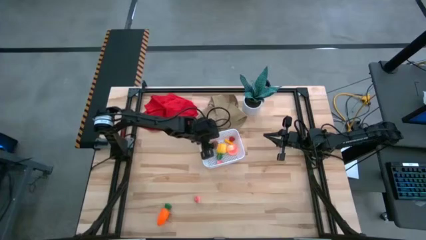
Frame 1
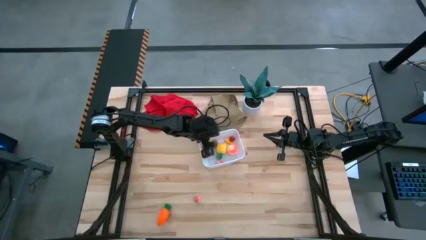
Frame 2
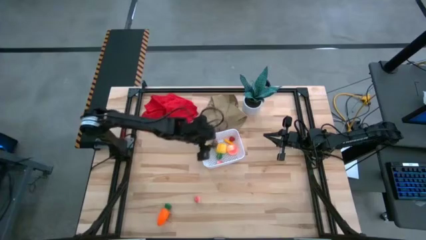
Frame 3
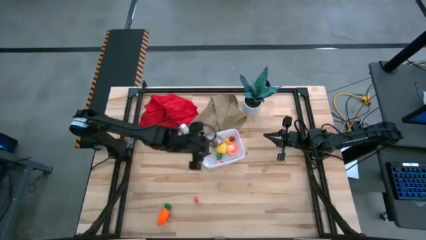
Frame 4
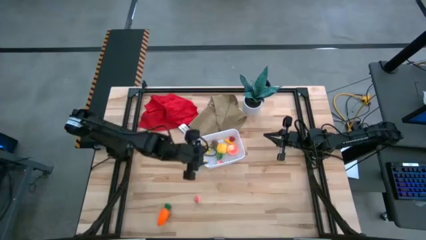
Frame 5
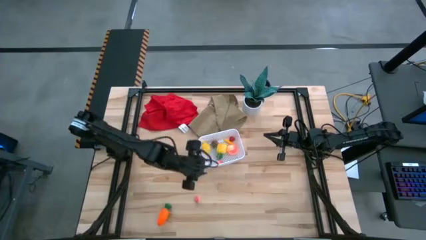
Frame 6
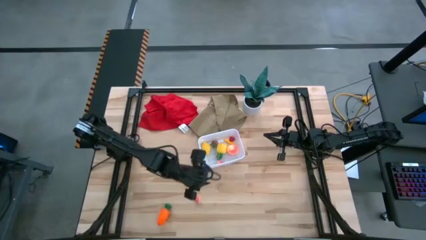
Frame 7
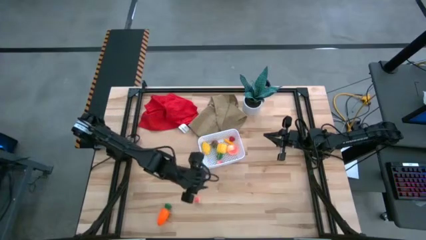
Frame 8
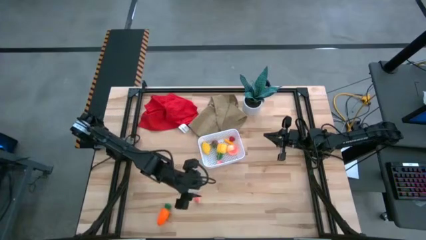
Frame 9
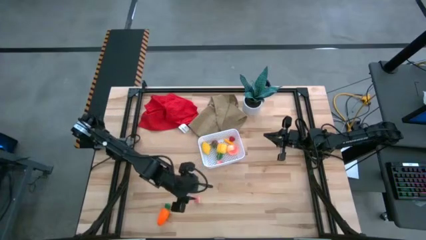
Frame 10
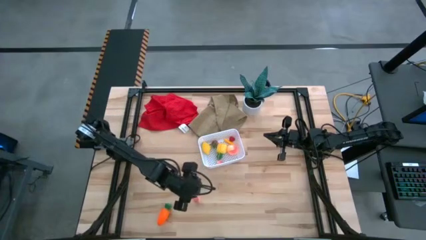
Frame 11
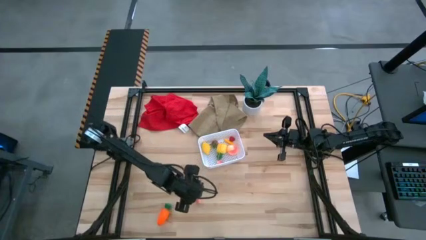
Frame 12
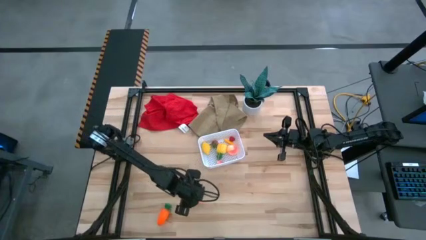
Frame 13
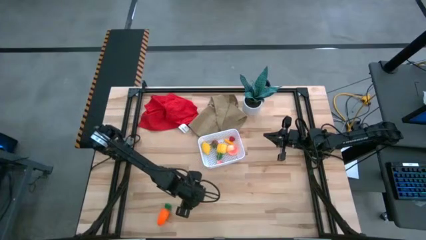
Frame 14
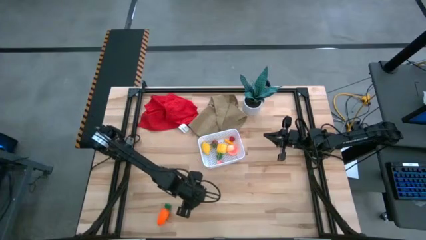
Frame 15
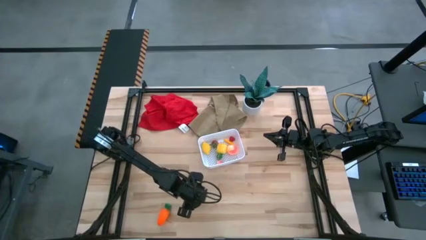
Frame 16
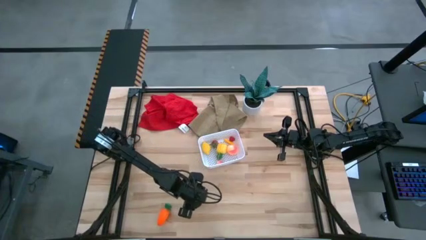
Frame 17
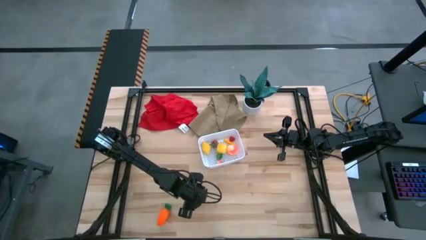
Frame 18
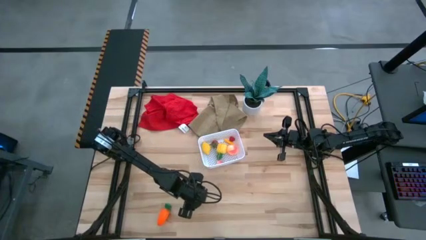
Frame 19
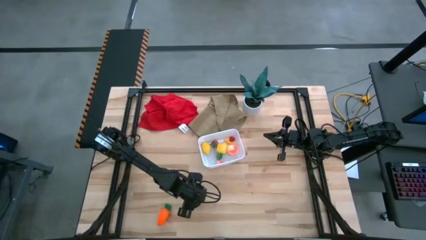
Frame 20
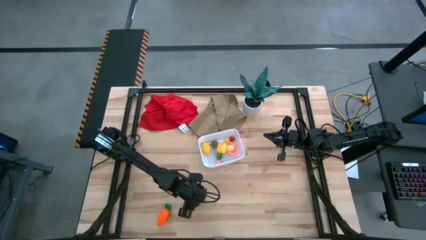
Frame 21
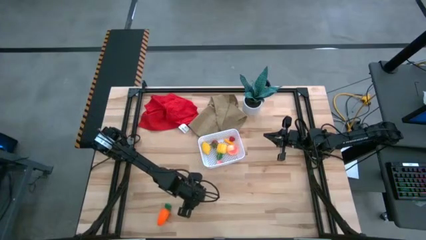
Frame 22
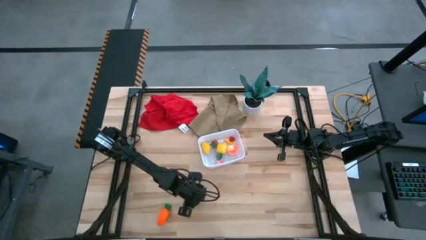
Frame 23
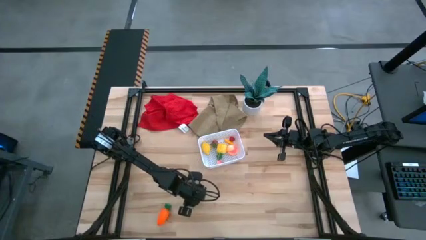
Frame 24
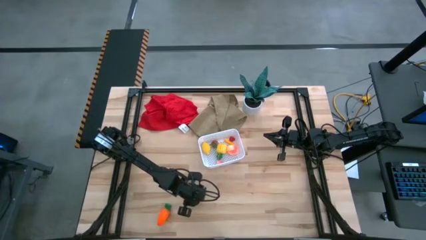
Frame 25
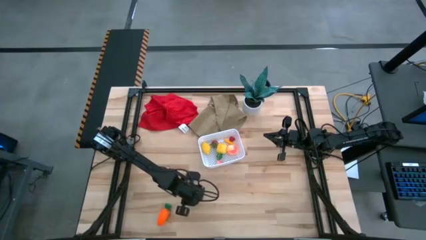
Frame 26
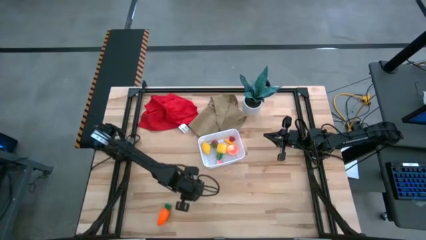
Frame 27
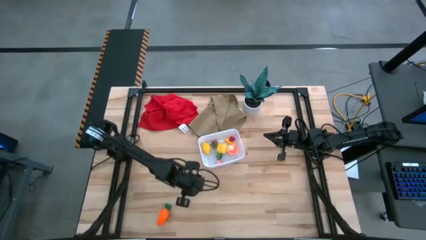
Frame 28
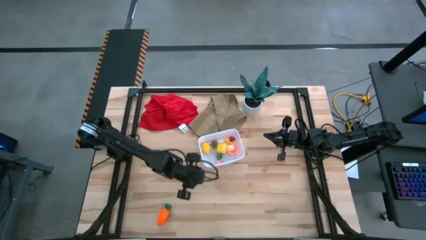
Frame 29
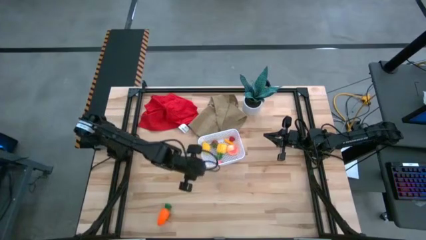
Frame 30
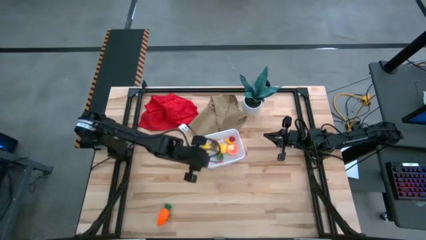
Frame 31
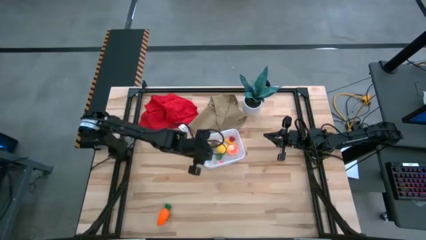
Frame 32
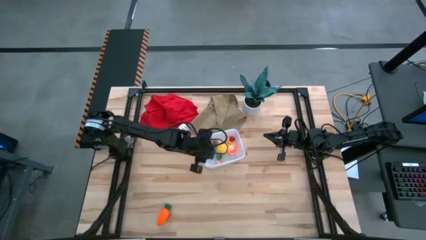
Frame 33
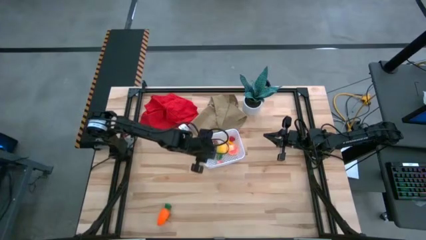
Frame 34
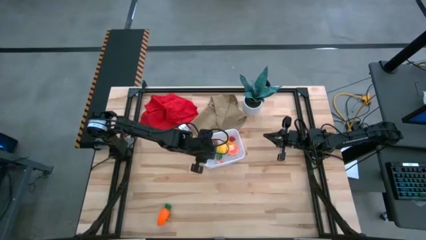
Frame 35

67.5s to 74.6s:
Task: Pick and placing Produce into tupperware
Put the peach into the white bin

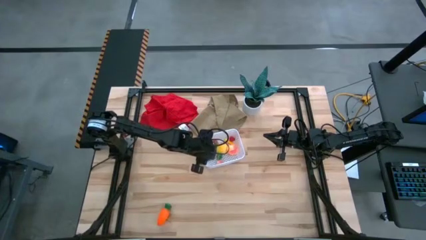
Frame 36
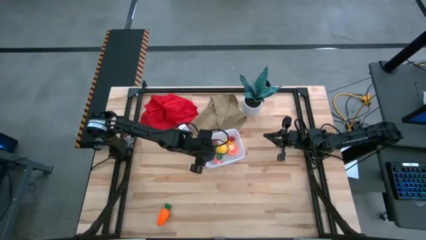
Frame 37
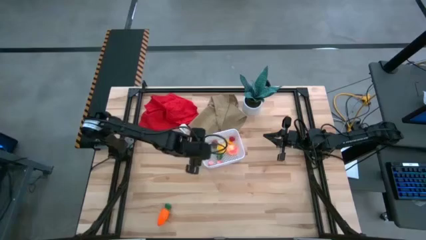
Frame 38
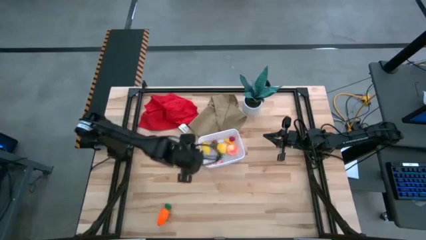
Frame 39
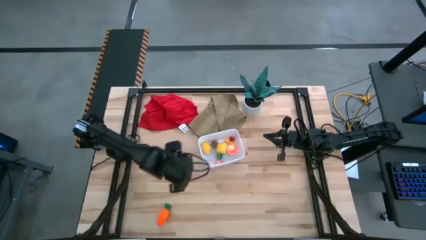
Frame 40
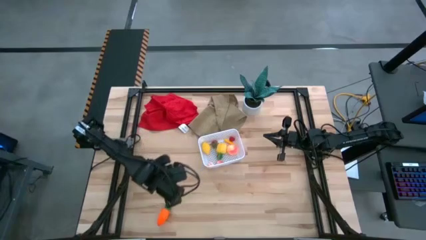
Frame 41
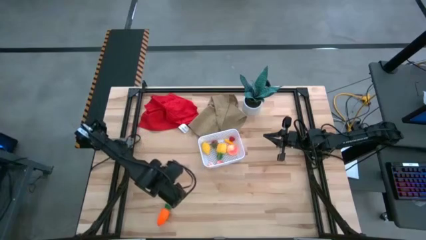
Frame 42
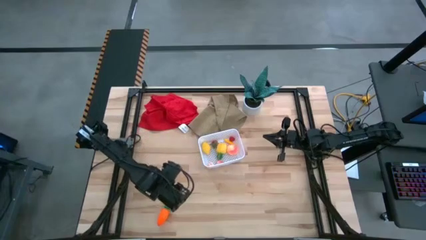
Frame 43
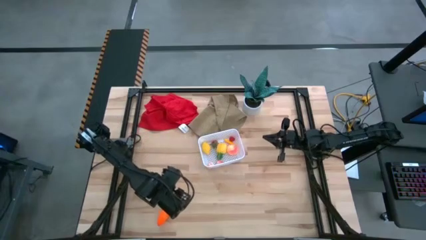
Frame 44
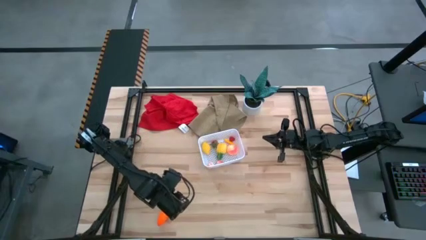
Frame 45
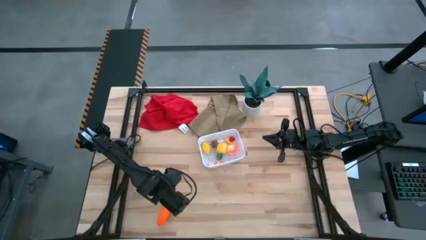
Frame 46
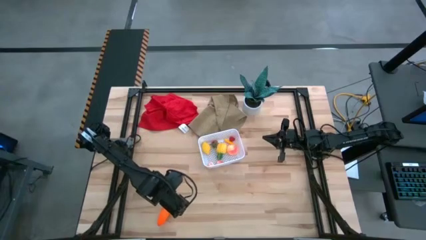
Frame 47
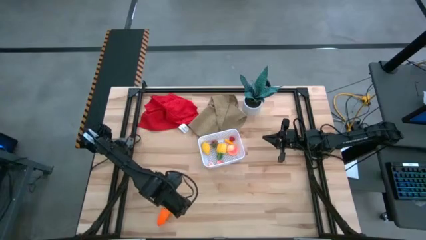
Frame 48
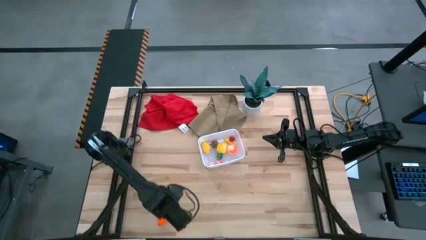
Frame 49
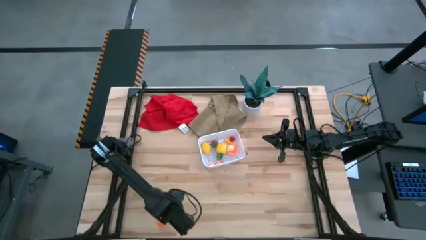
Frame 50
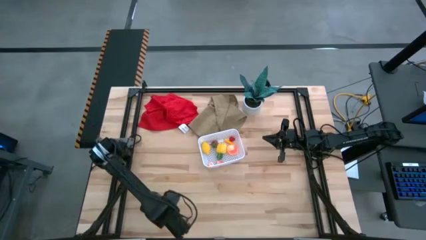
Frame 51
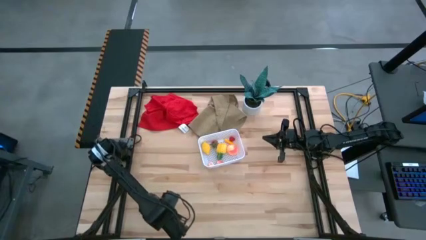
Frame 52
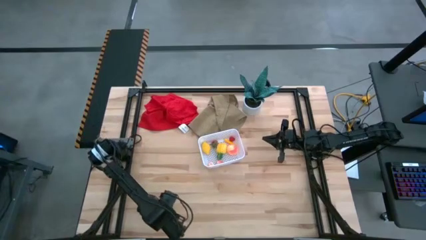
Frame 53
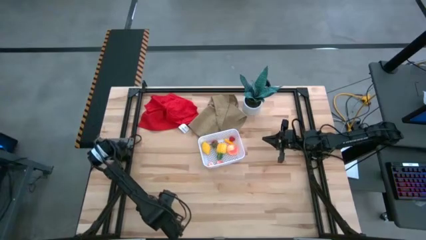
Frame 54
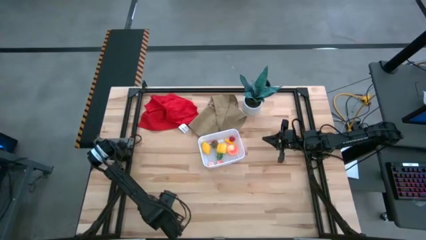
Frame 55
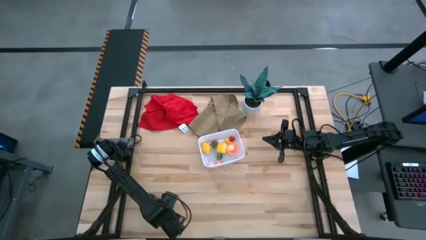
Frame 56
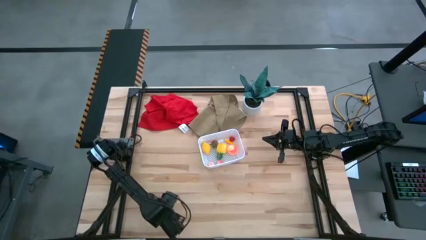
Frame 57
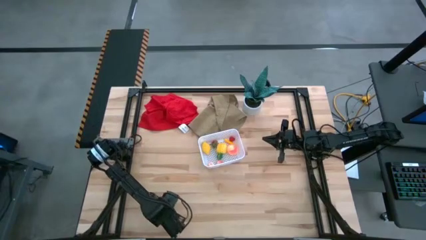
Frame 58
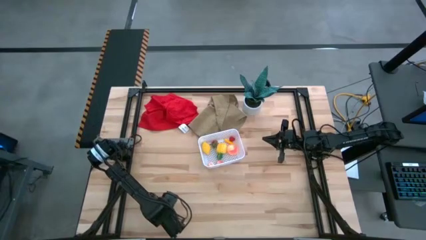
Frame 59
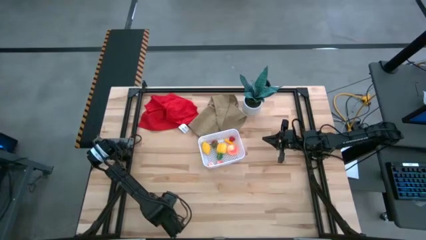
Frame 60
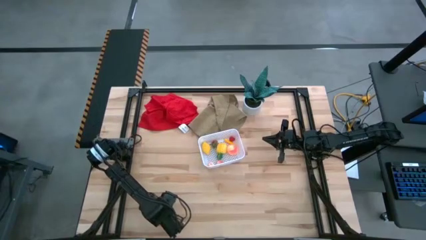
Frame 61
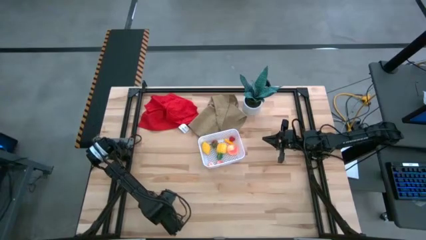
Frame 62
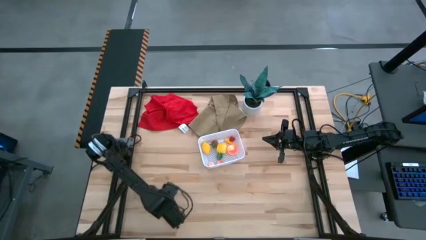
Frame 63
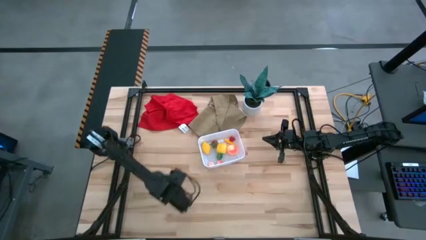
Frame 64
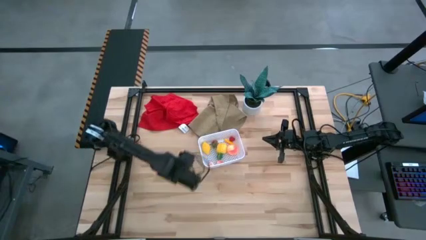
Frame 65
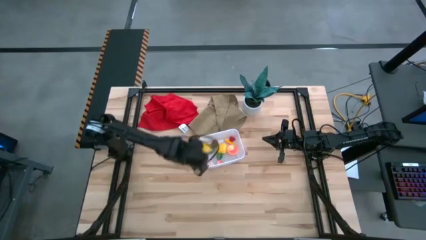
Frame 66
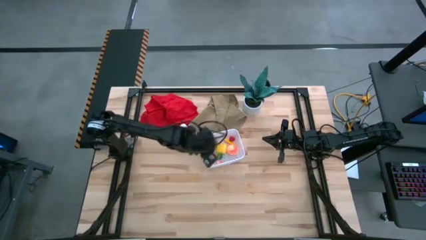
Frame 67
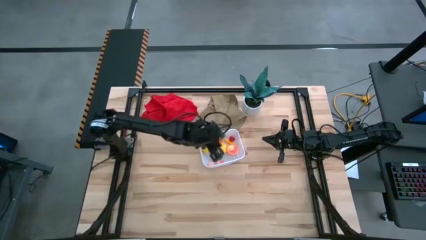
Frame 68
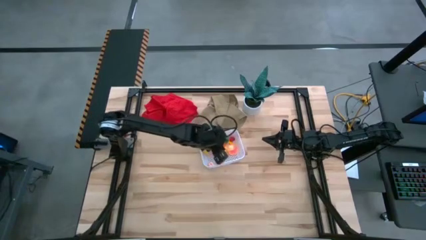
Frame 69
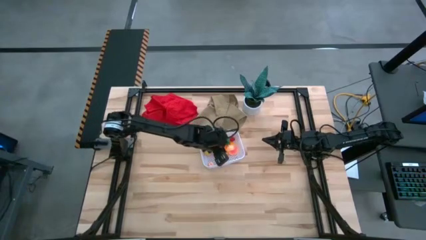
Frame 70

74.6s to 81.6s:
Put the carrot into the white bin

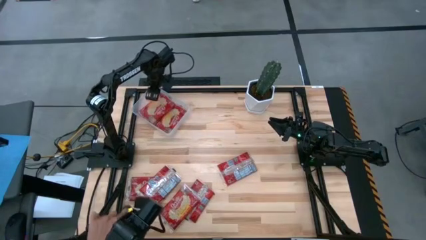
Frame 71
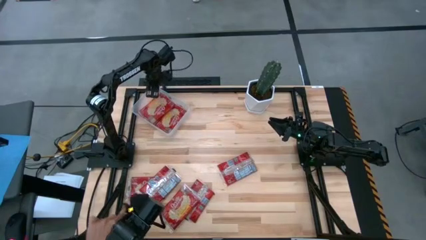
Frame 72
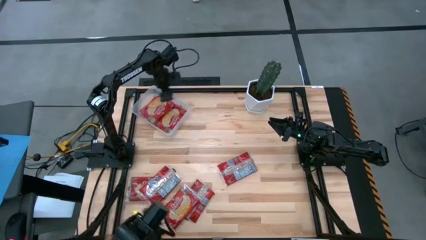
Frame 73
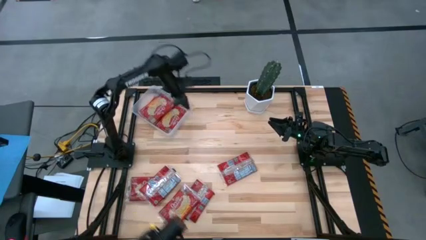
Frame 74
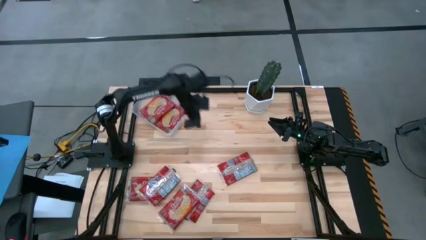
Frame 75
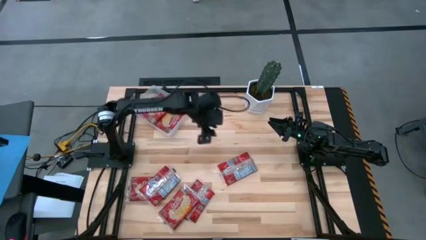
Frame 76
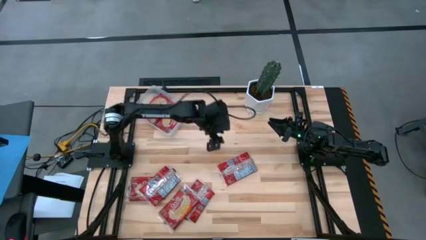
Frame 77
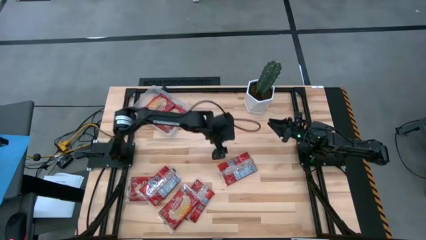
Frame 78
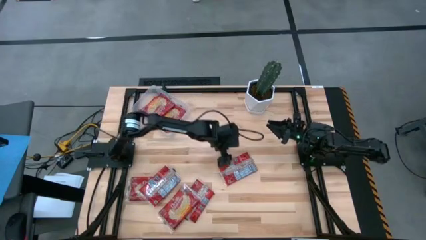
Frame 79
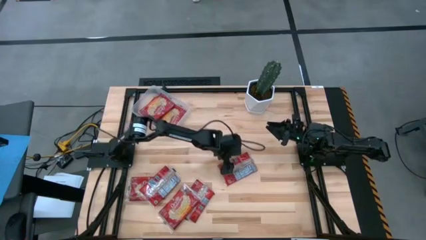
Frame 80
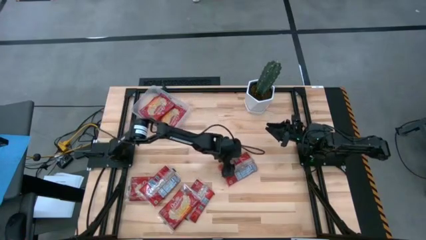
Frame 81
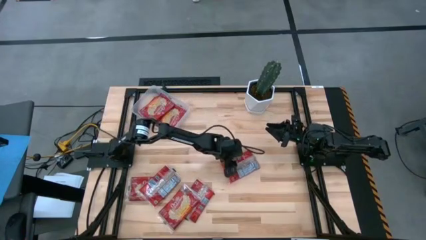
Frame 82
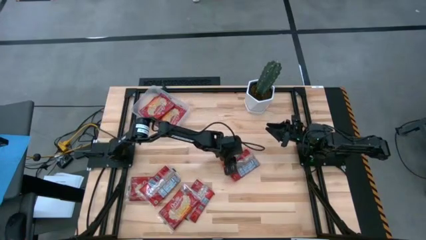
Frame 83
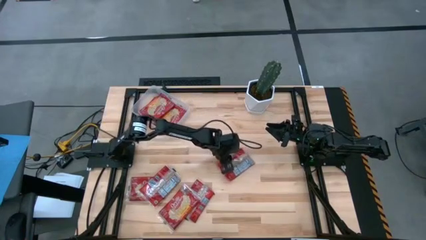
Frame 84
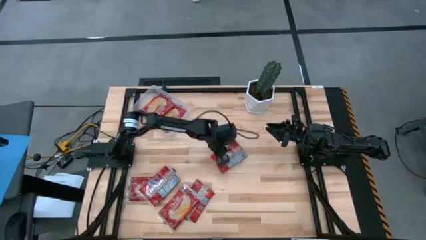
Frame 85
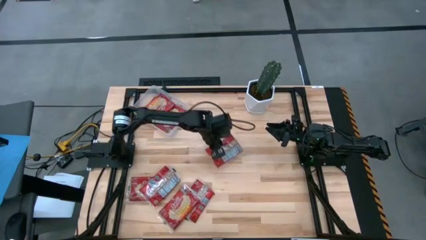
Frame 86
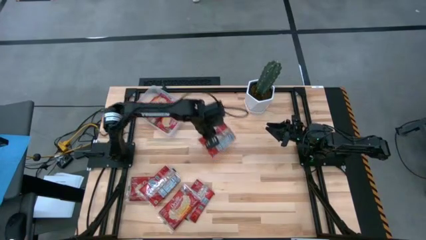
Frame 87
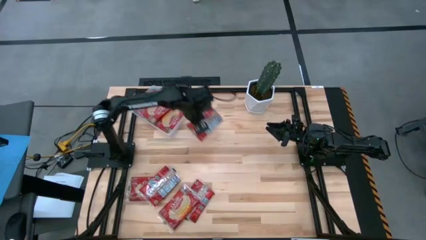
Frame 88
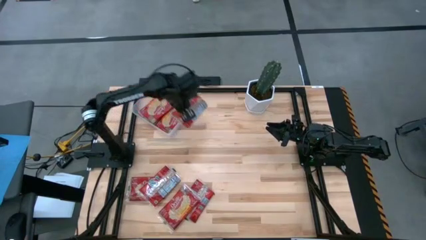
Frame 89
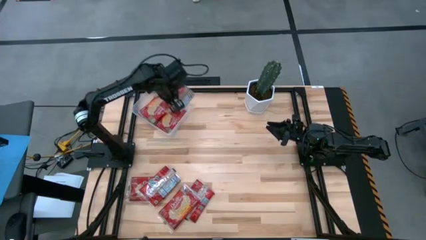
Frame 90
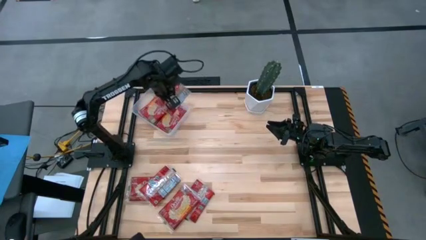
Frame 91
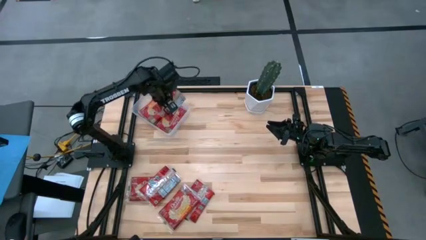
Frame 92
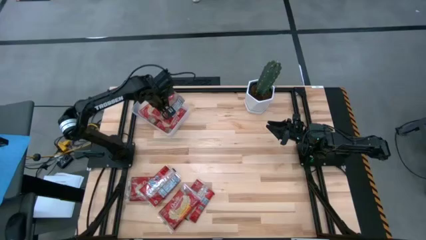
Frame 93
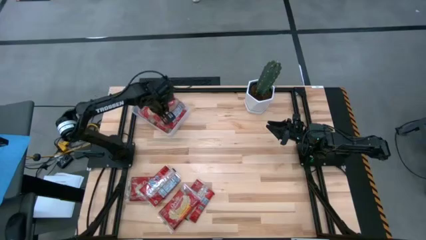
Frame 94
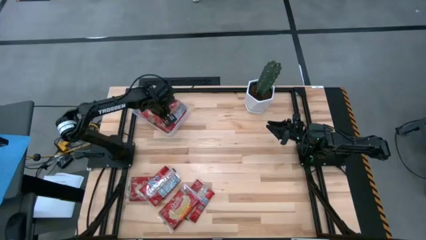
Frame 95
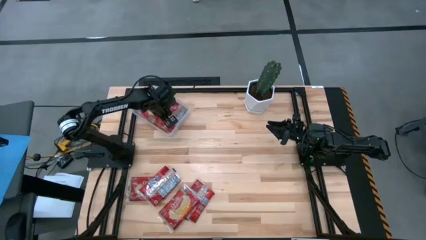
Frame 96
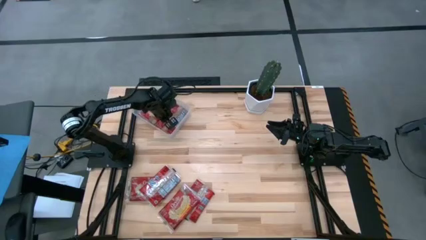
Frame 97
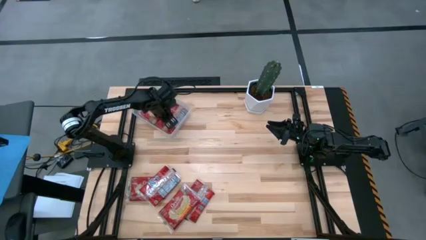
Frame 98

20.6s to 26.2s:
Task: Sort popcorn bags into baskets
Put the red popcorn bag into the transparent bin
